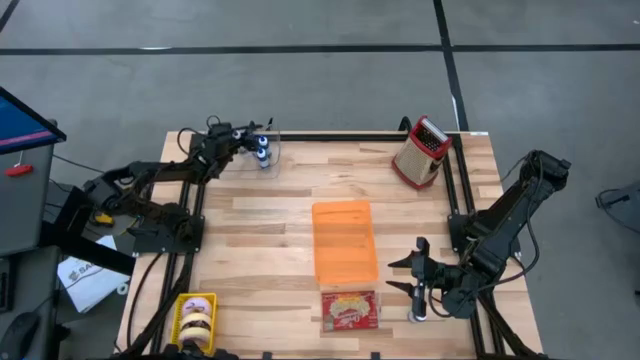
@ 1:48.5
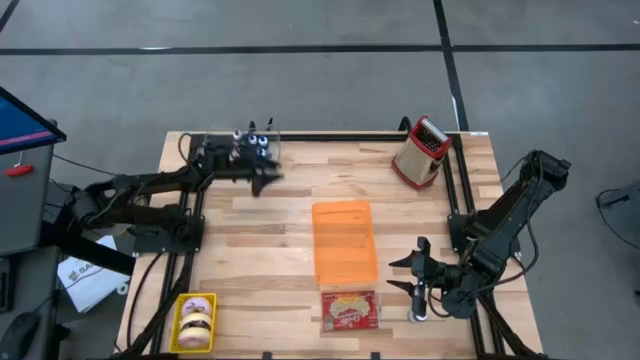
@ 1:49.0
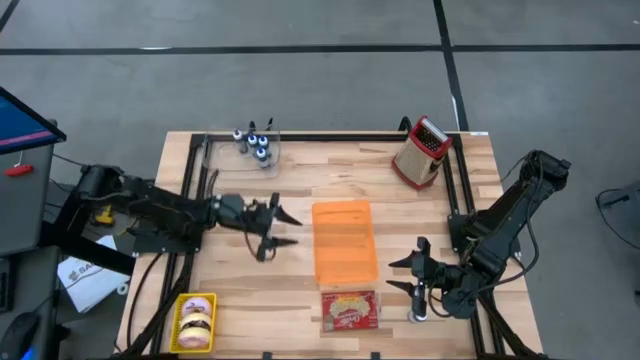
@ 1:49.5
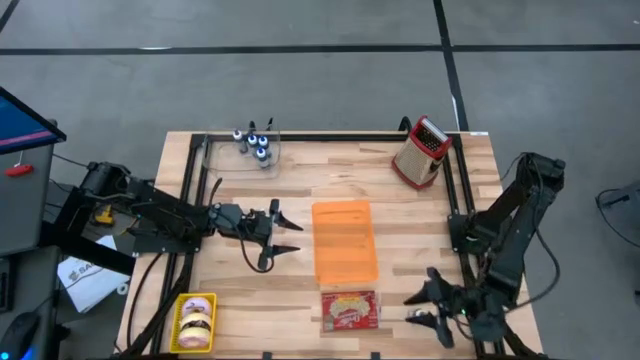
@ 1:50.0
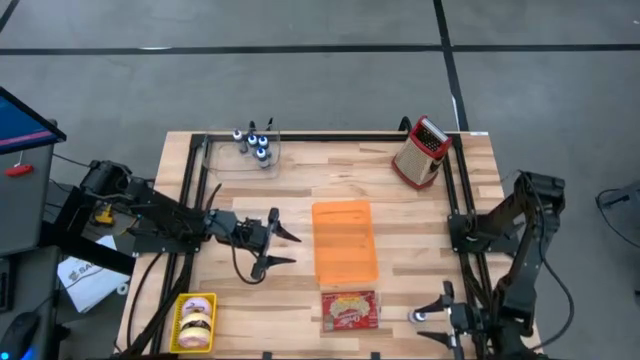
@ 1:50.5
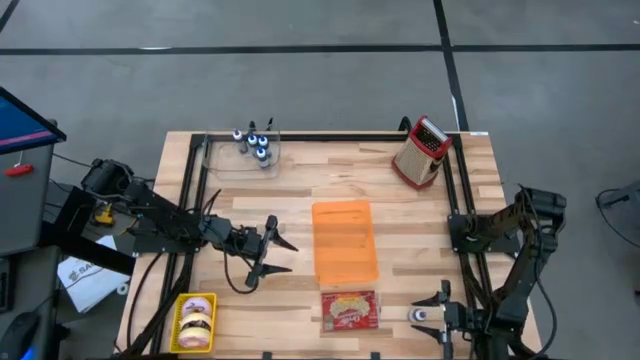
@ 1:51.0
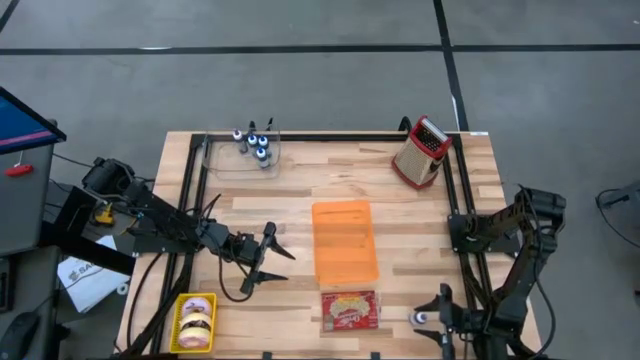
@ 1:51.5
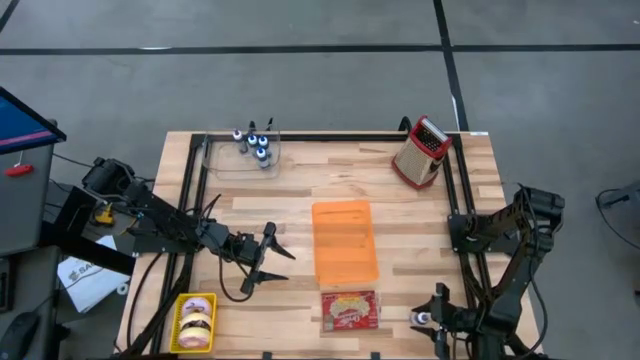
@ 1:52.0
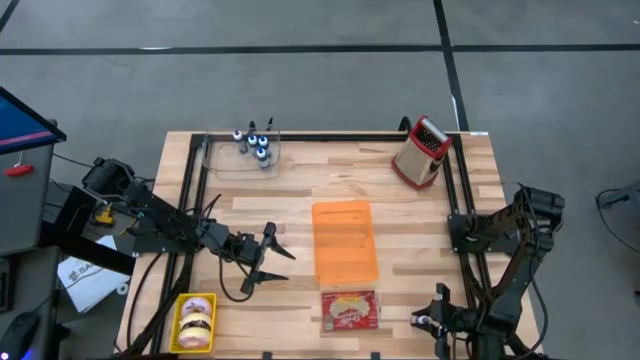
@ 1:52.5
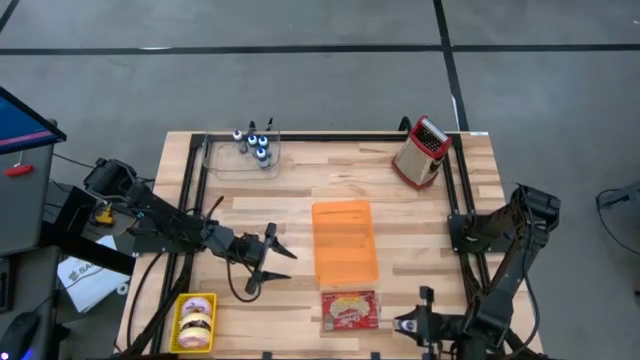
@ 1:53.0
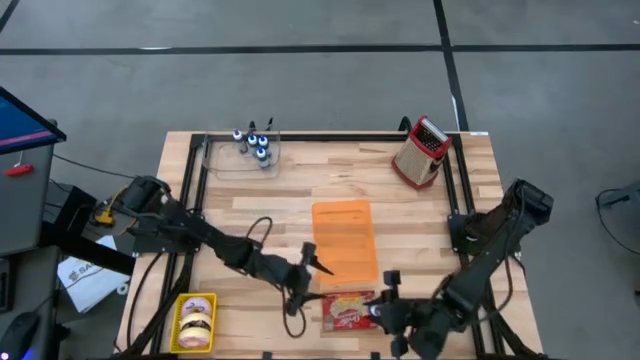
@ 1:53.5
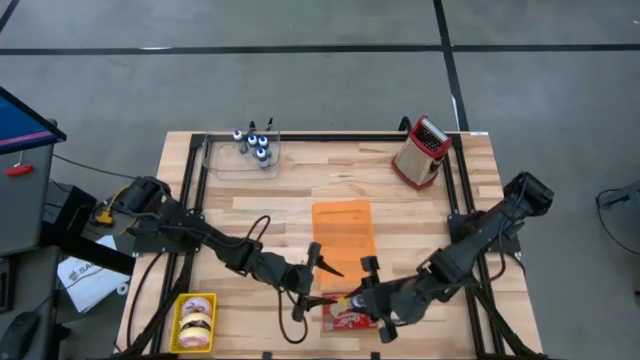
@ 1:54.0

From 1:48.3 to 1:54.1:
Task: Pick & Place Food Item
Put the violet food coloring bottle into the transparent bin

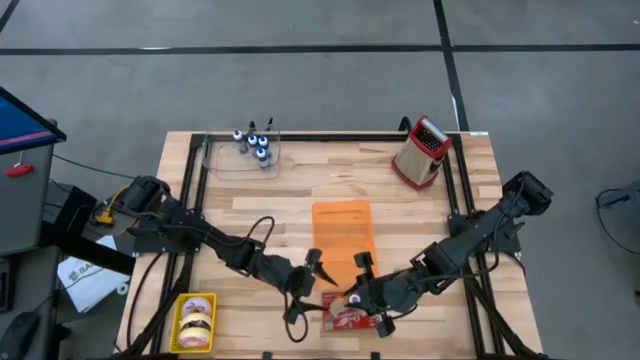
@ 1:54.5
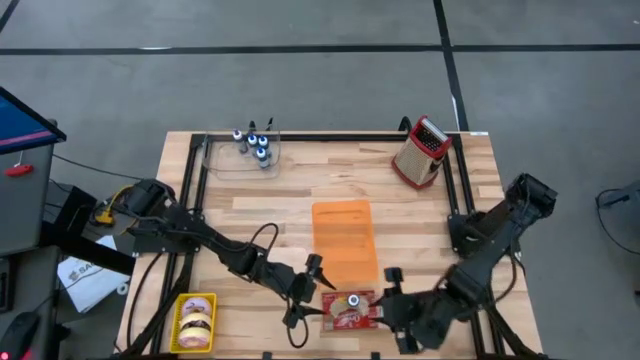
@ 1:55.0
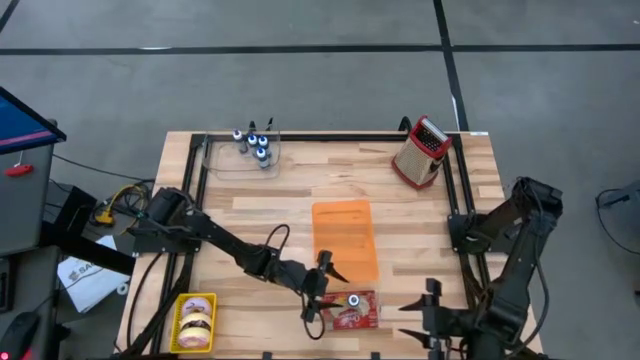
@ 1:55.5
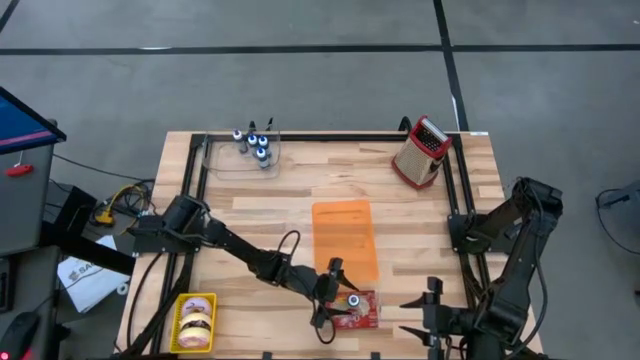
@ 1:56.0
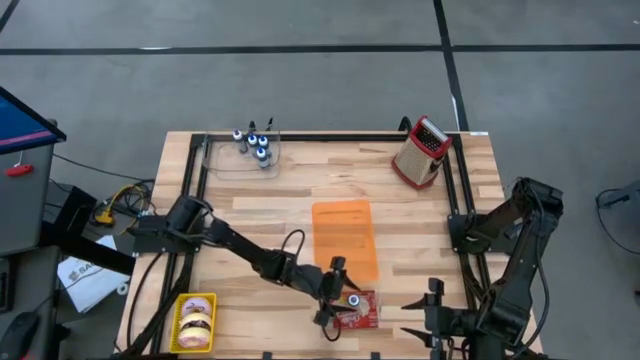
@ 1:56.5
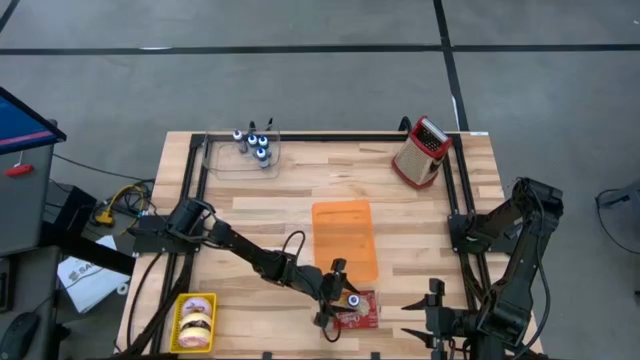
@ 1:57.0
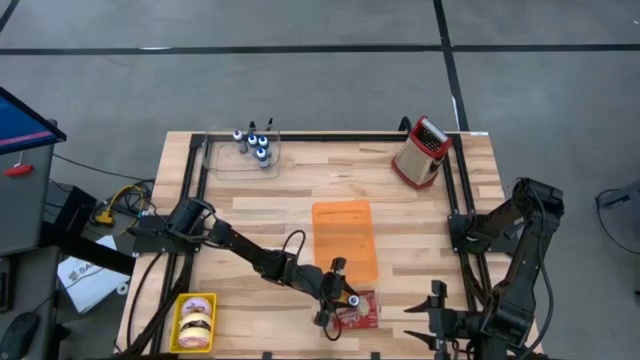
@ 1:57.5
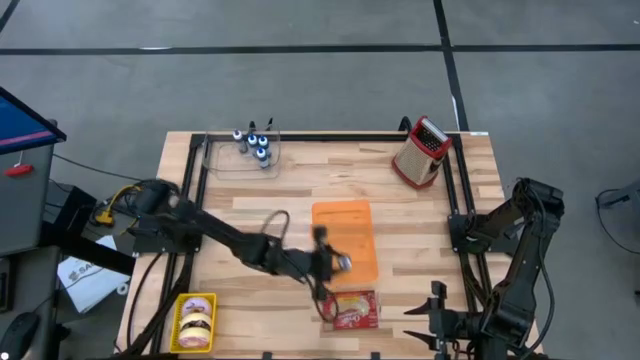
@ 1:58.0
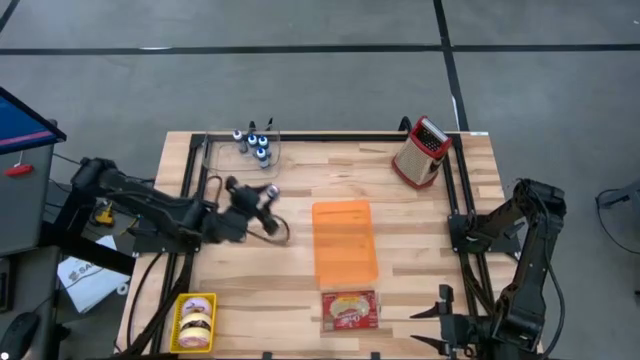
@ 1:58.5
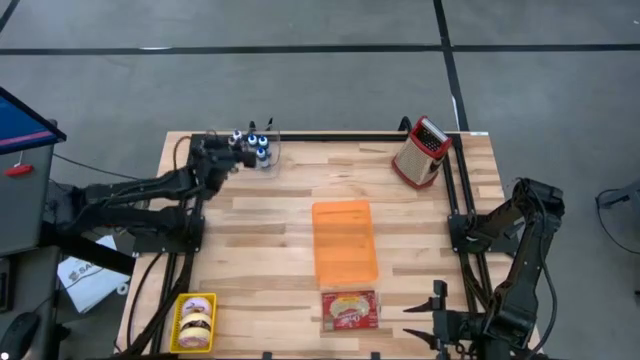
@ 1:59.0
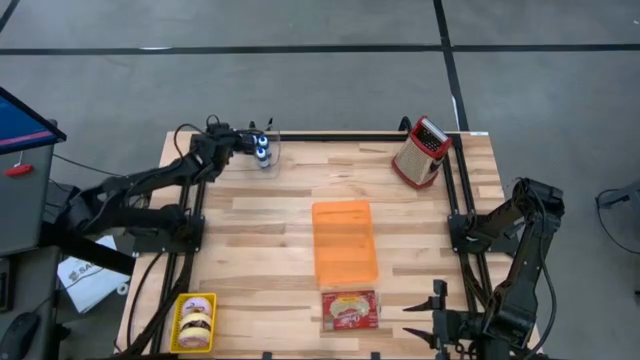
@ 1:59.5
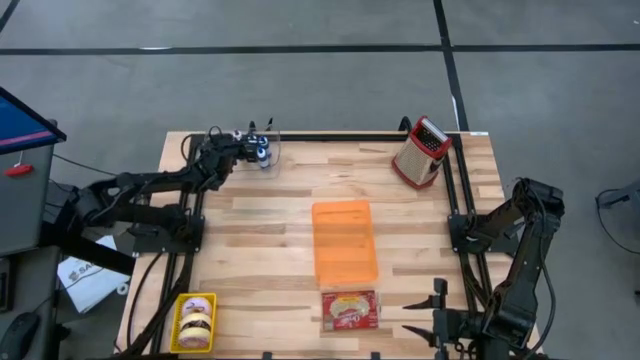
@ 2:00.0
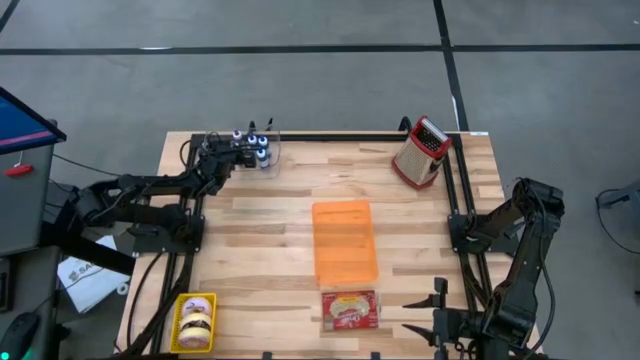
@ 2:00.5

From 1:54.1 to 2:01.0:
Put the violet food coloring bottle into the transparent bin

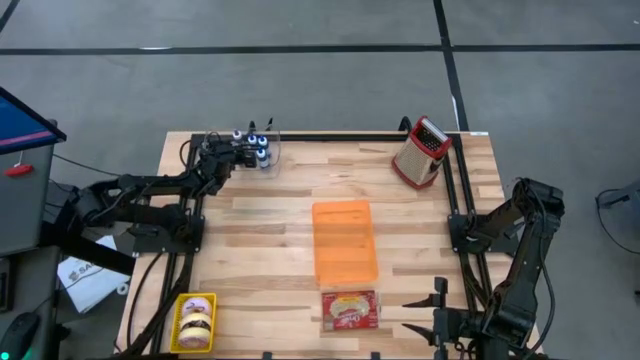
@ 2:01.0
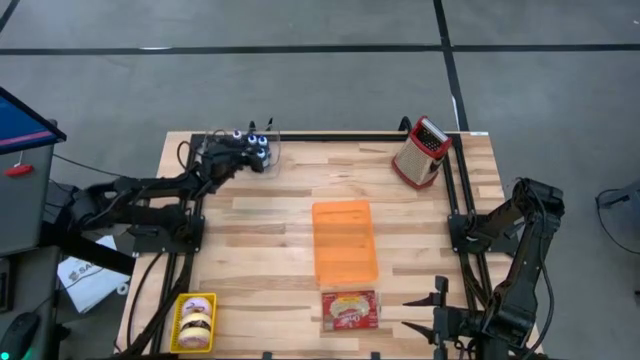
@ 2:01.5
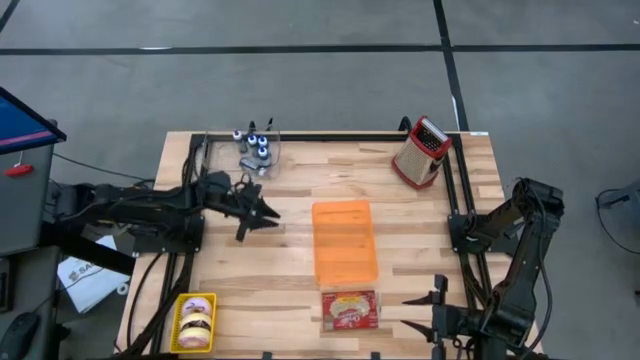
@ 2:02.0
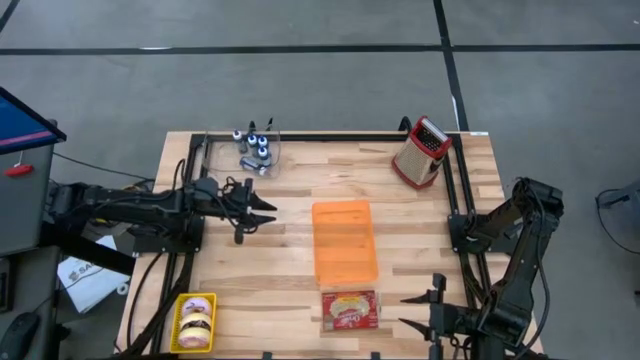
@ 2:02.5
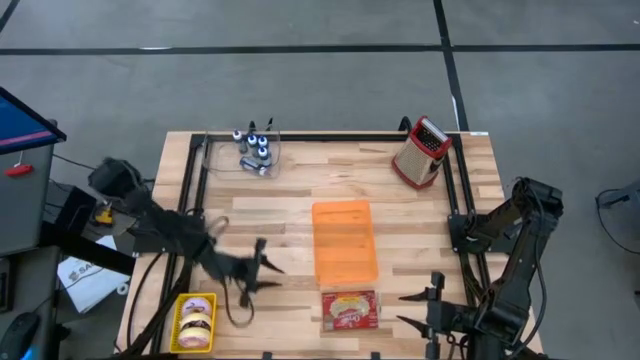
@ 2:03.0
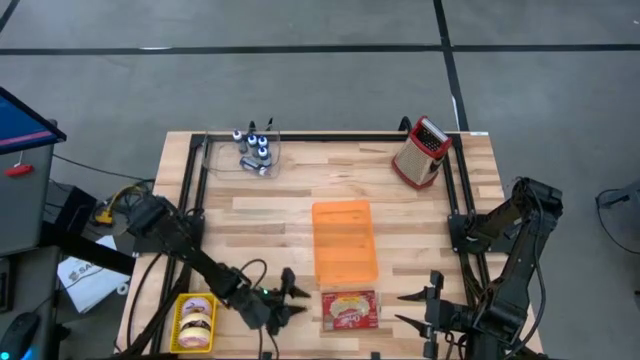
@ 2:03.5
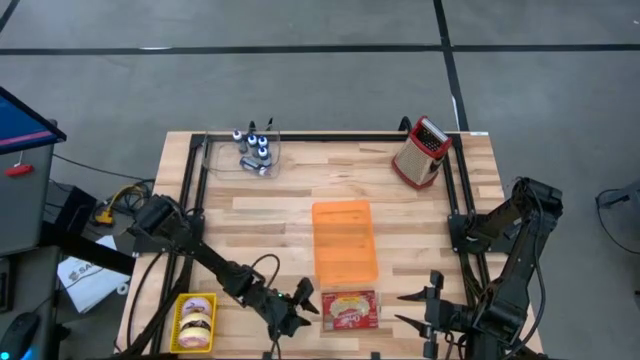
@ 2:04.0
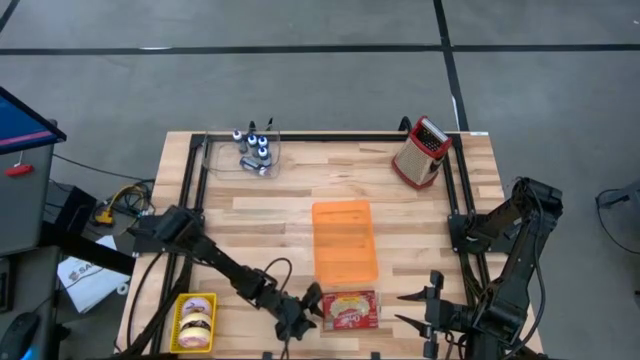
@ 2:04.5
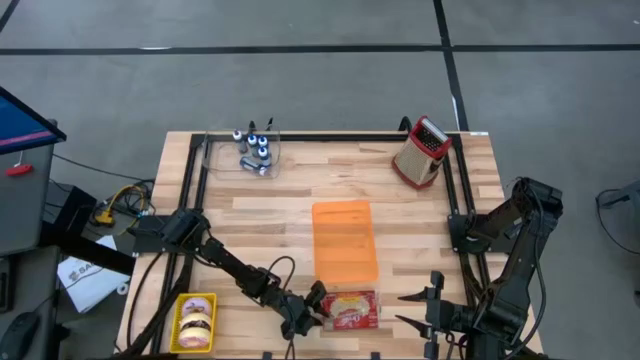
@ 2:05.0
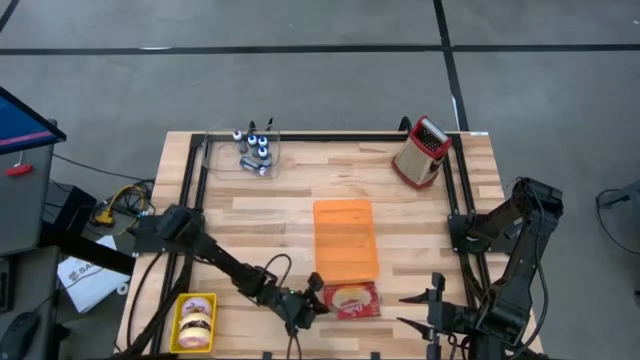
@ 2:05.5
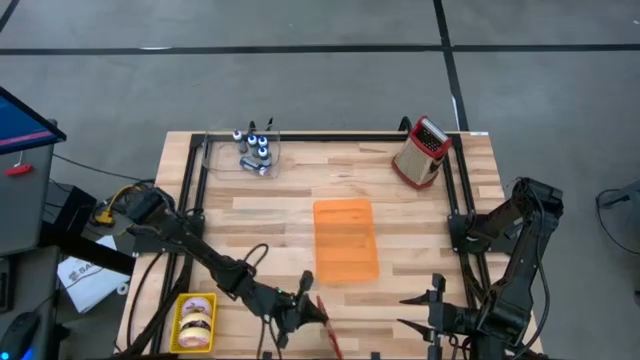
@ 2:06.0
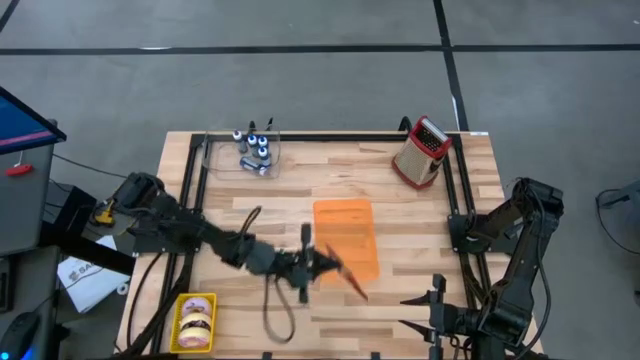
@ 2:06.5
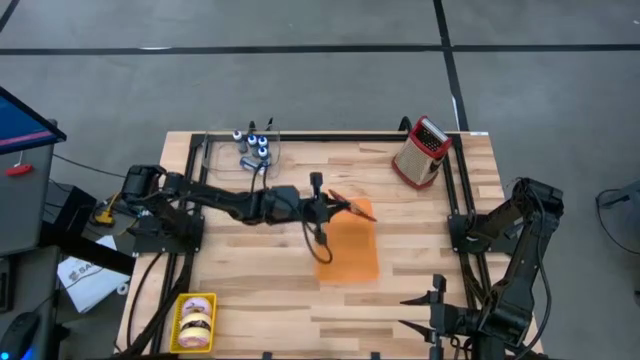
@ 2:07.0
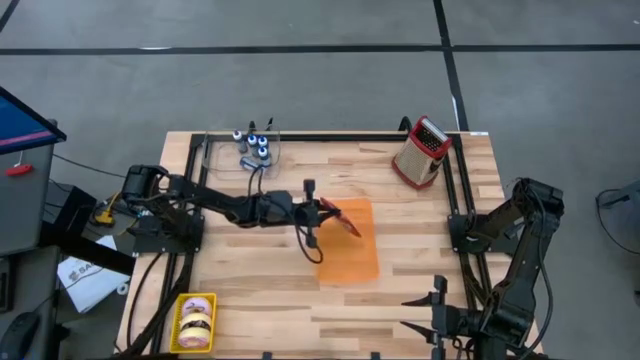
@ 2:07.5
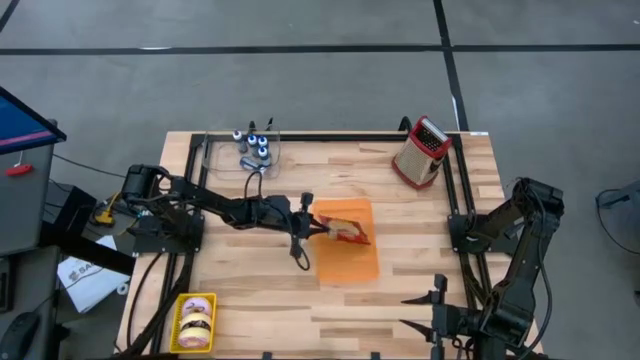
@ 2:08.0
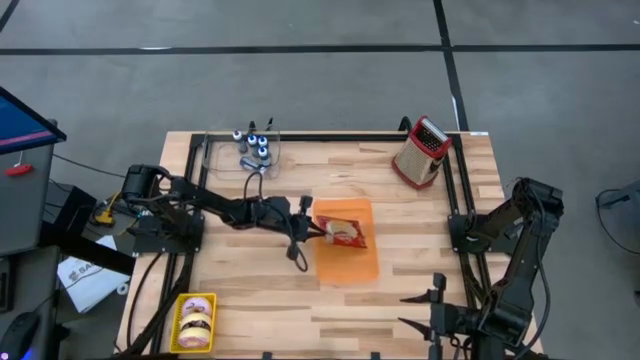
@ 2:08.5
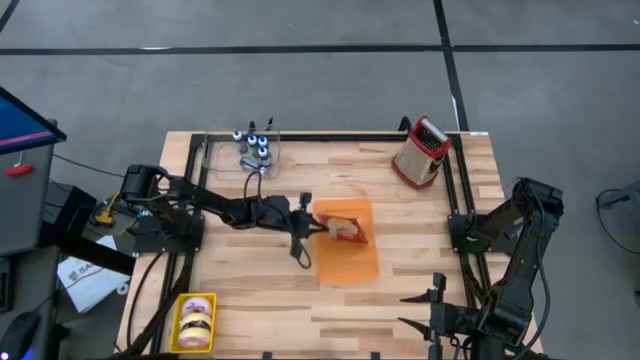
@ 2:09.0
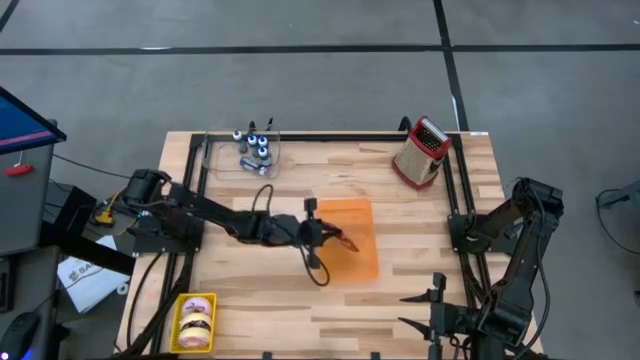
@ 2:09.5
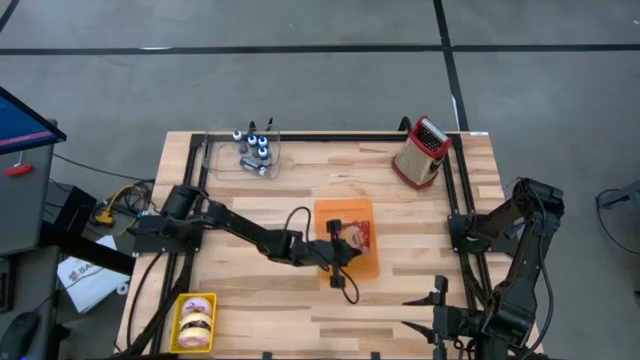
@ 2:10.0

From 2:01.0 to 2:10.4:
Put the popcorn bag into the orange bin
